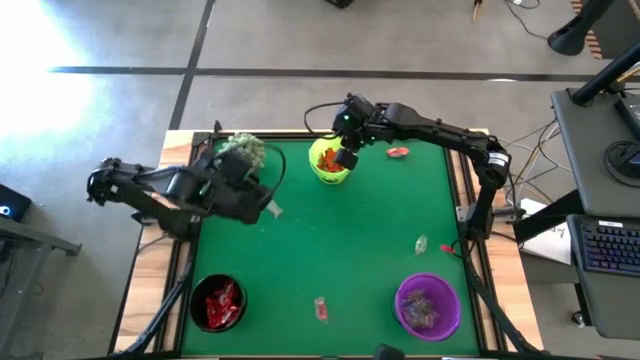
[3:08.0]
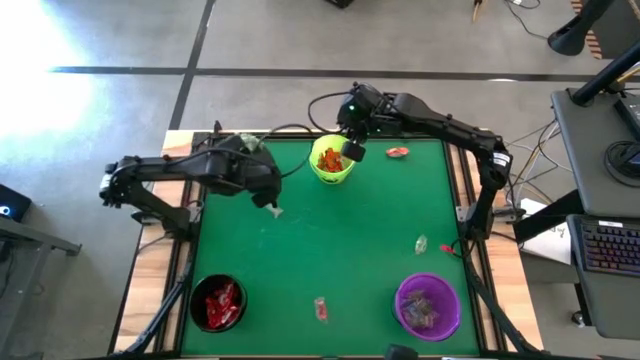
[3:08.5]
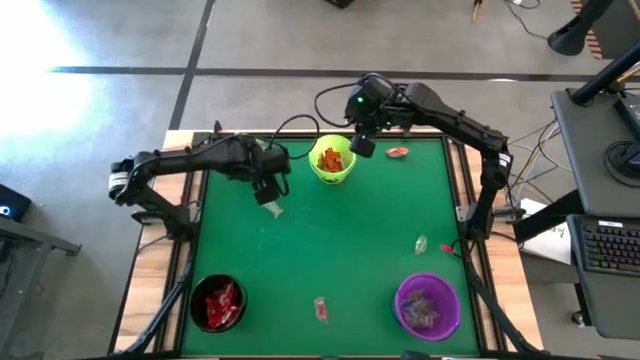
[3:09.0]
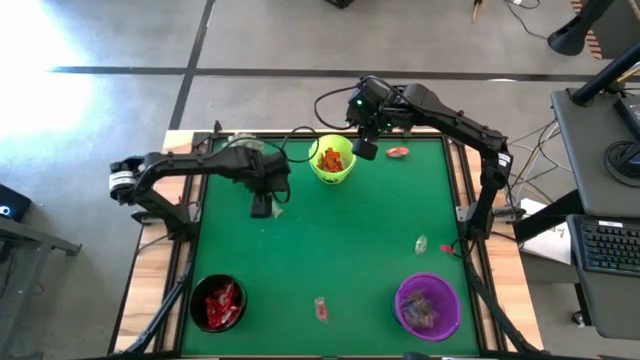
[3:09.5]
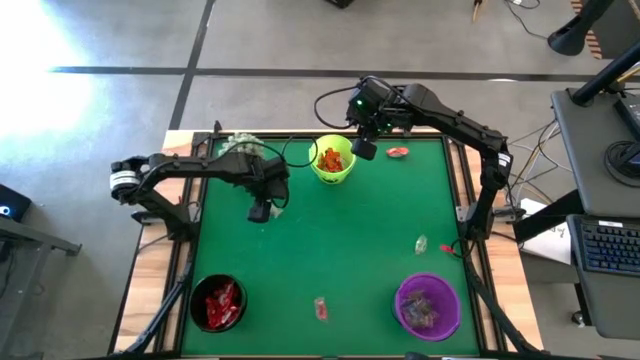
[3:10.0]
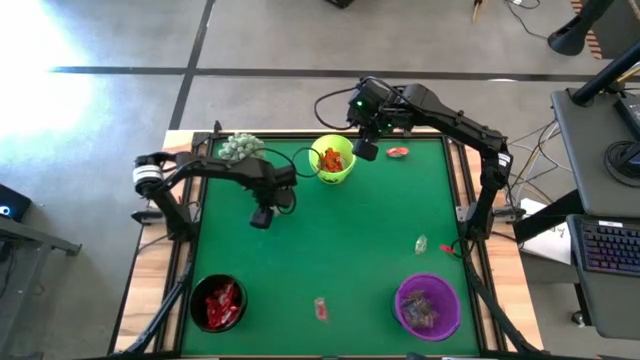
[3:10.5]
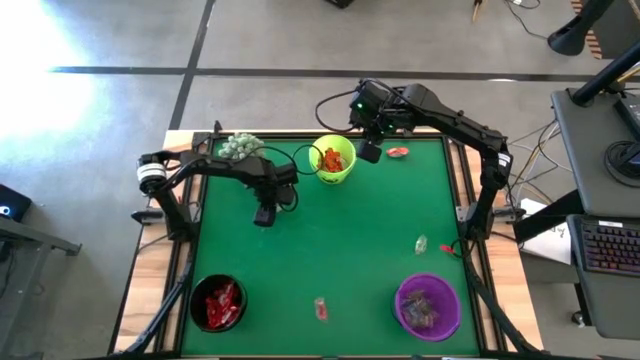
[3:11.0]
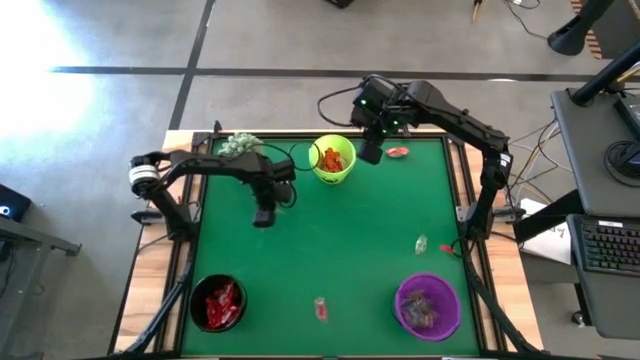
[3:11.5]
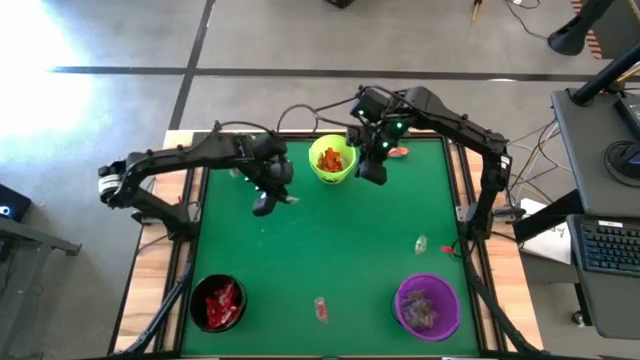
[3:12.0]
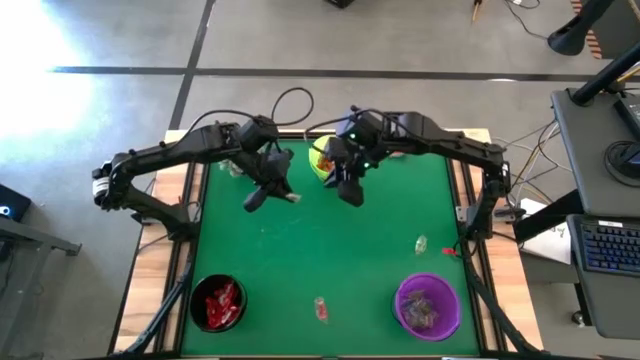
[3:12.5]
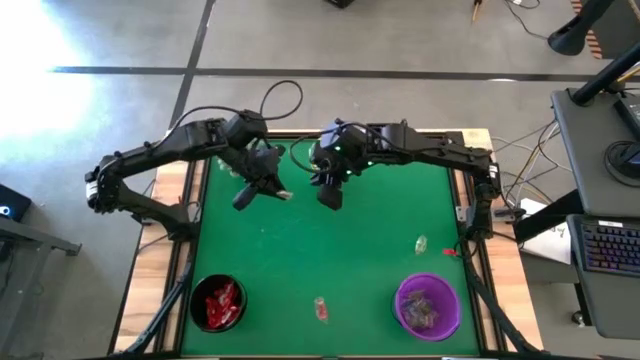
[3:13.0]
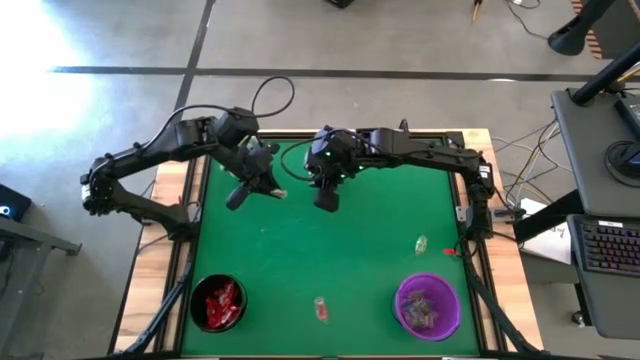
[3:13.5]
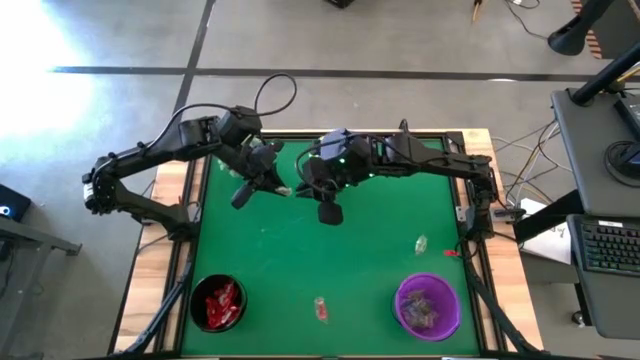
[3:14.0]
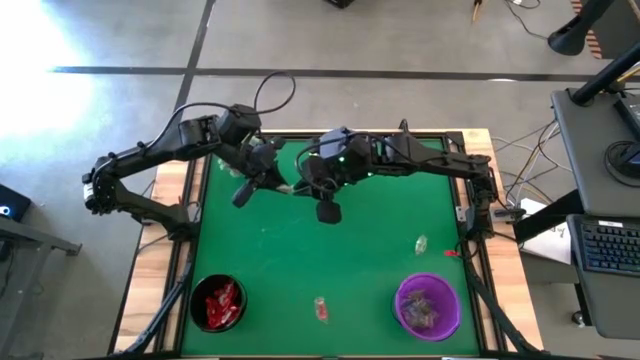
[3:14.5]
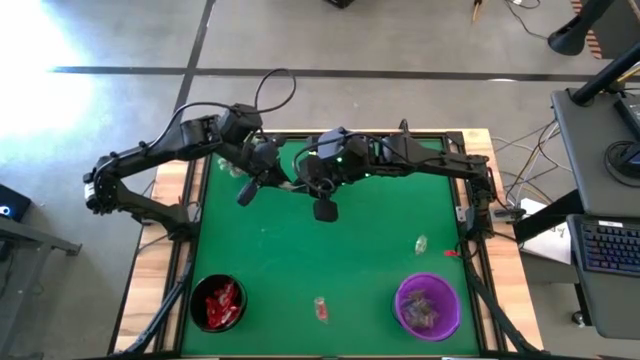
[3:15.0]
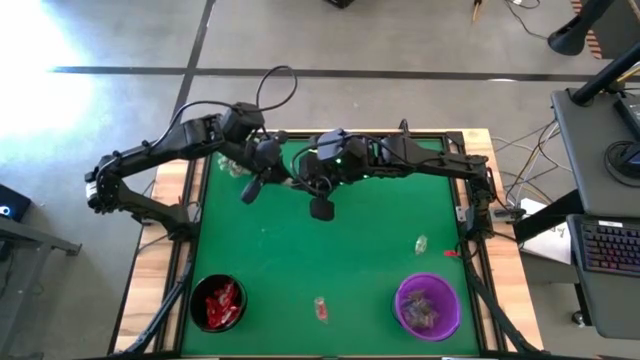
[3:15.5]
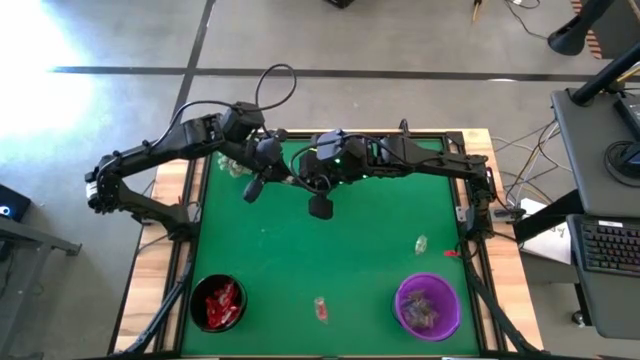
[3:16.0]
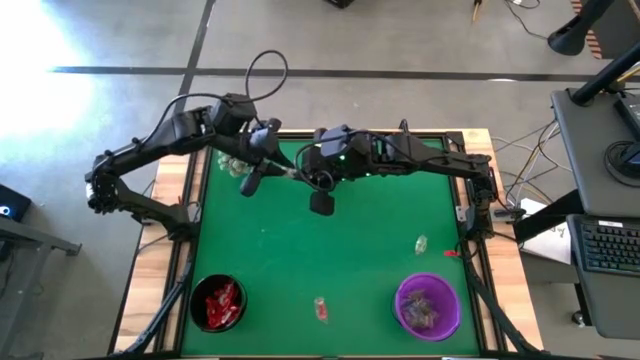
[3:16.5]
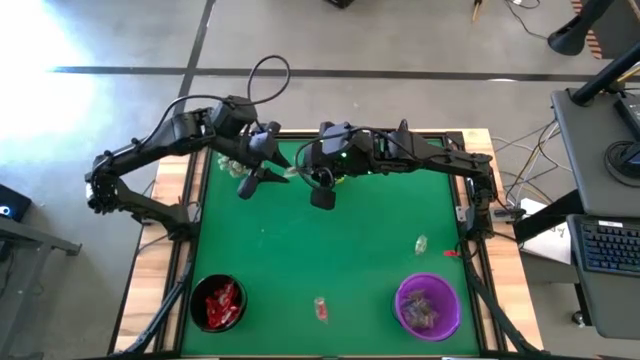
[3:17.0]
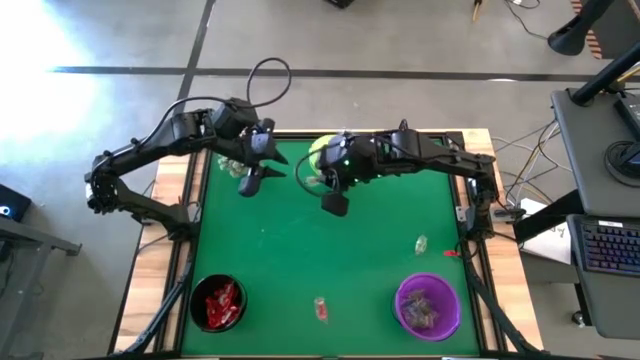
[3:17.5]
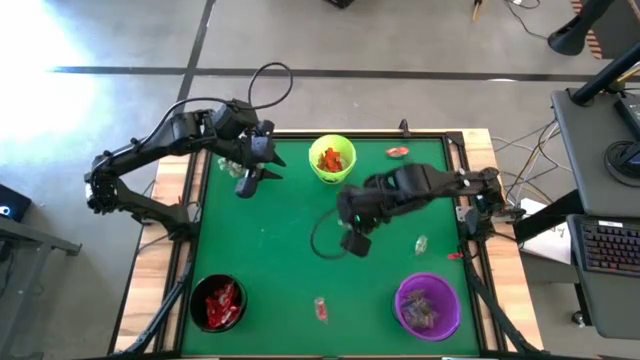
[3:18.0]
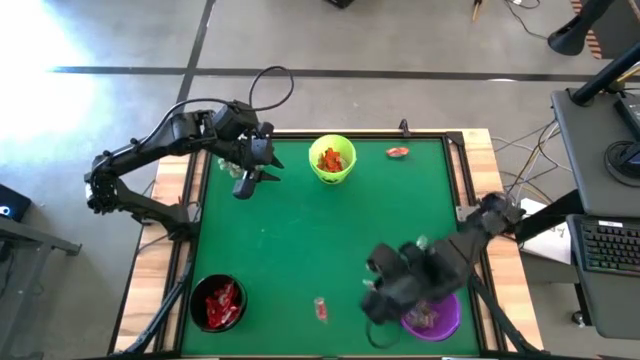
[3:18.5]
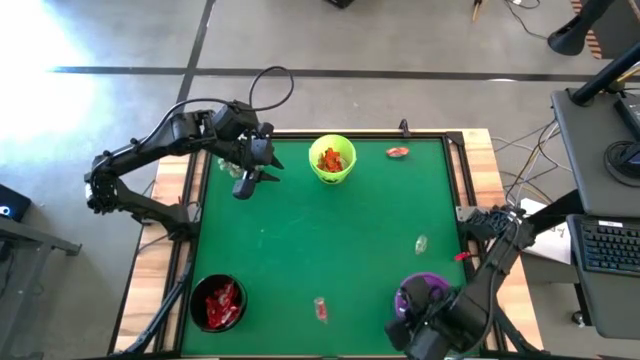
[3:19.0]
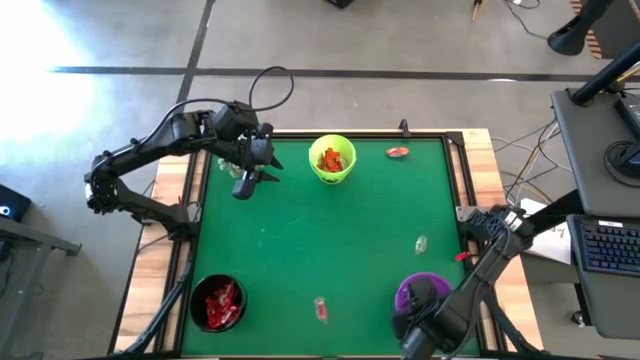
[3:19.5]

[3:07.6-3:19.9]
Task: Organize candy in baskets
Put the green candy into the violet bucket

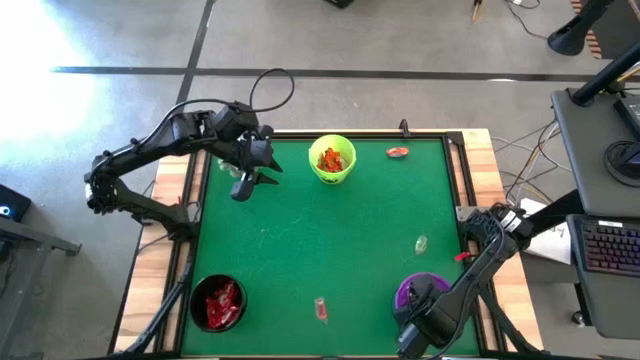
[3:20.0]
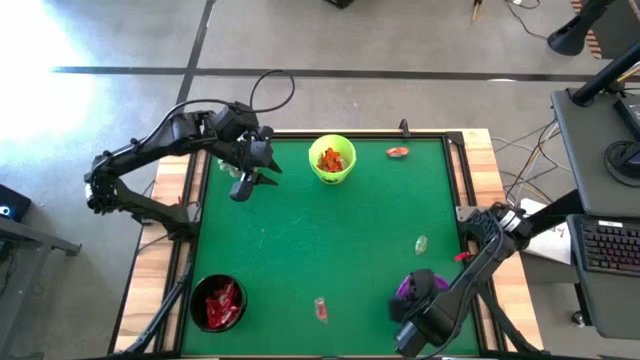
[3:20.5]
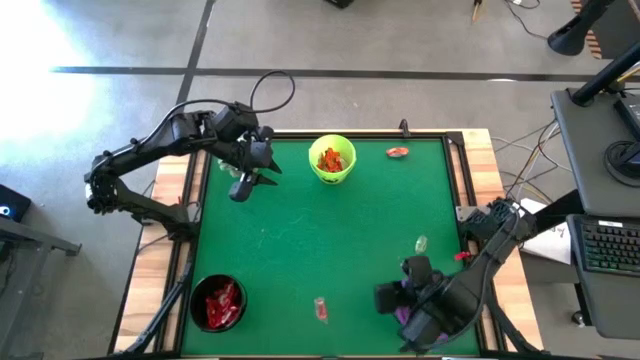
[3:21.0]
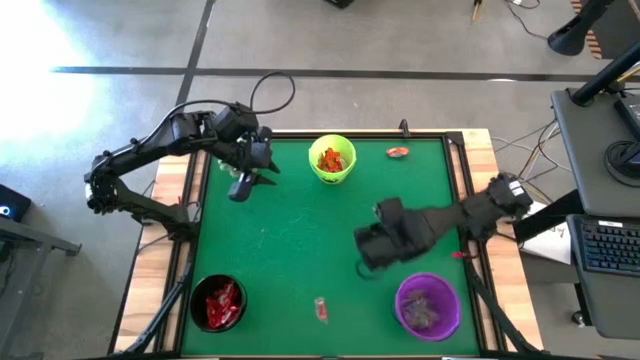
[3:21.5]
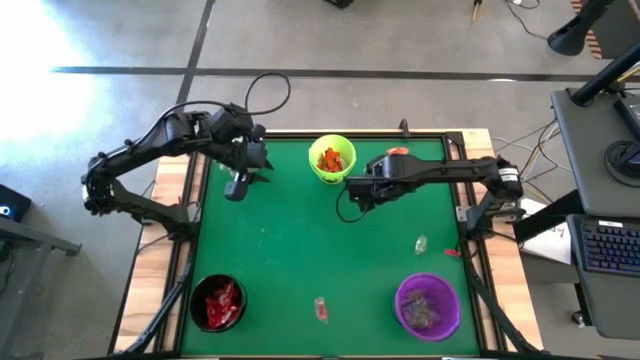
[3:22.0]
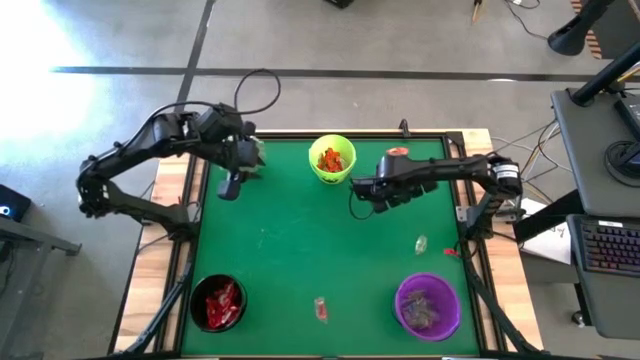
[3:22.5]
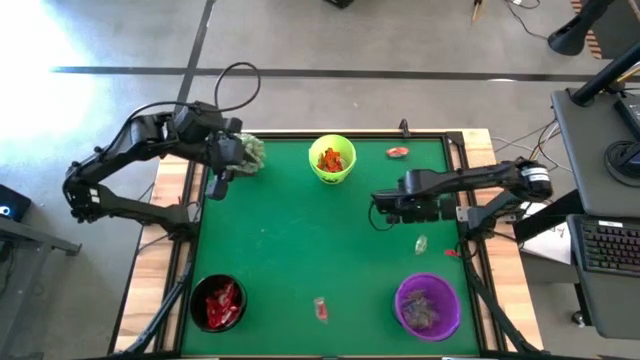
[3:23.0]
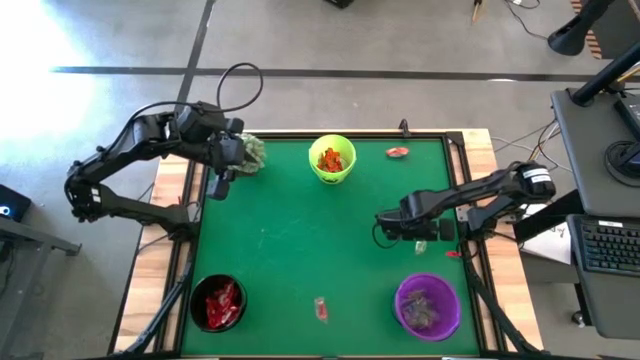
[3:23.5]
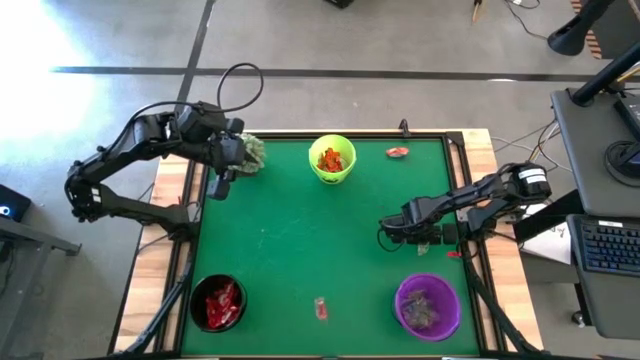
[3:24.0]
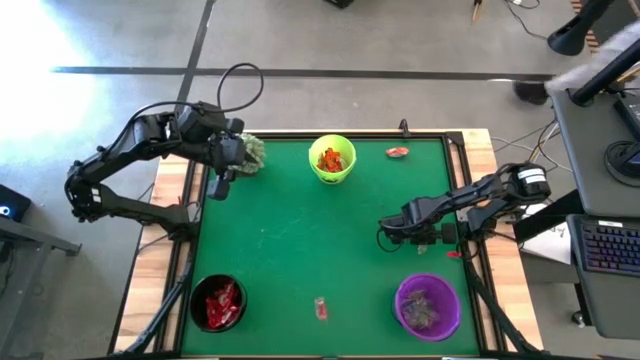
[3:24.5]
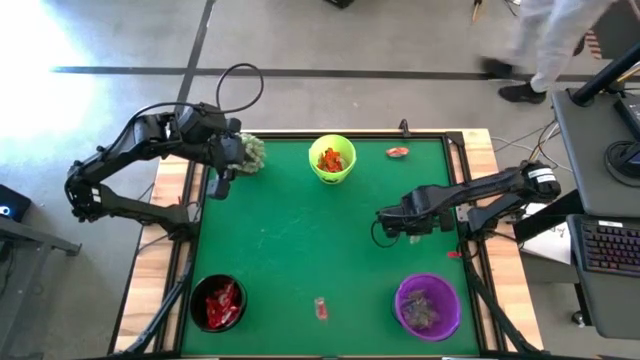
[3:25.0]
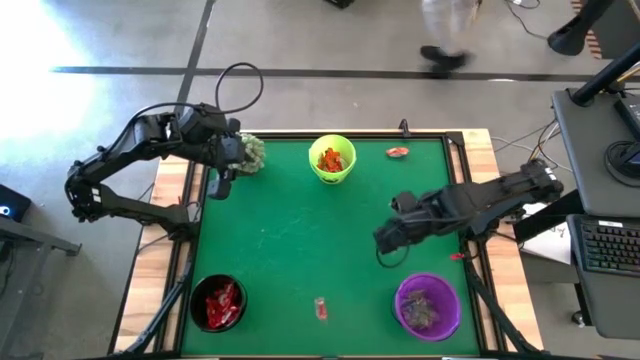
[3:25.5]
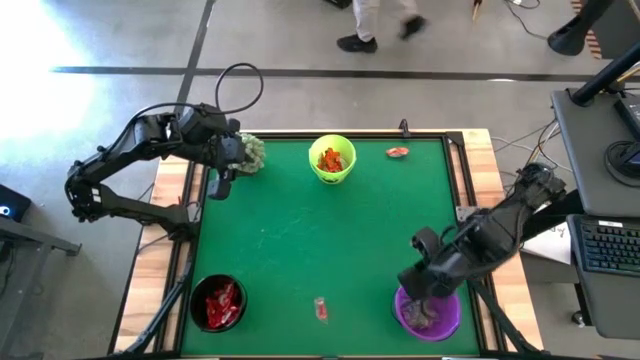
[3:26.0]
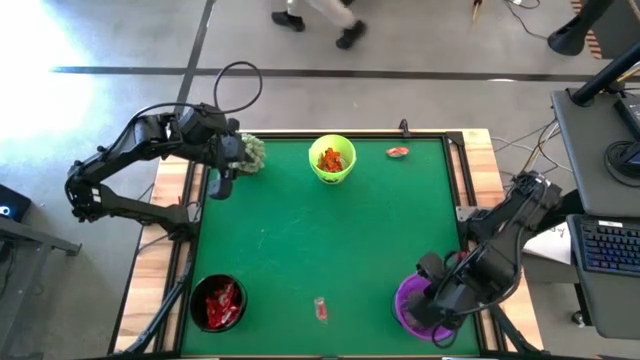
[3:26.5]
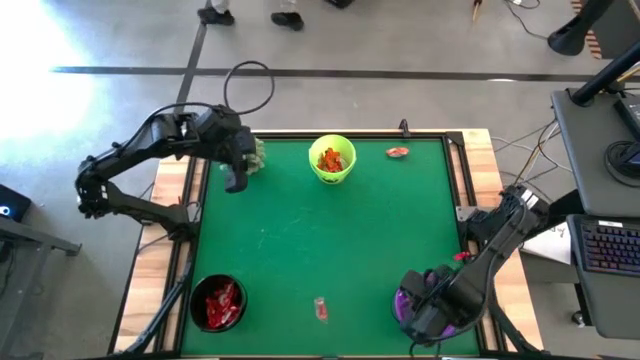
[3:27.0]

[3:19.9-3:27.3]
Put the green candy into the violet bucket

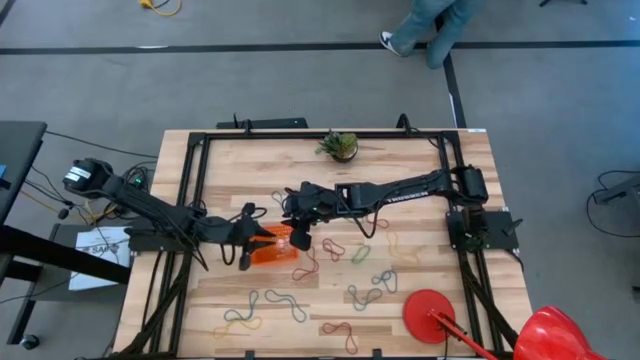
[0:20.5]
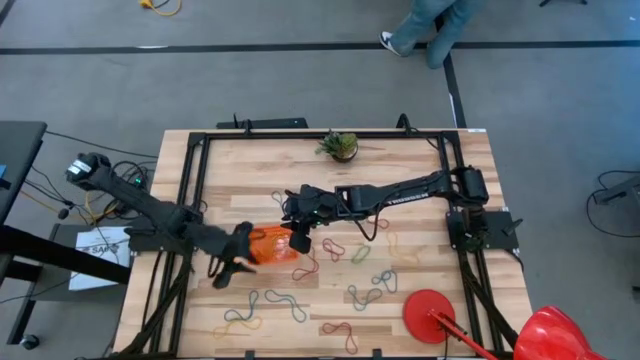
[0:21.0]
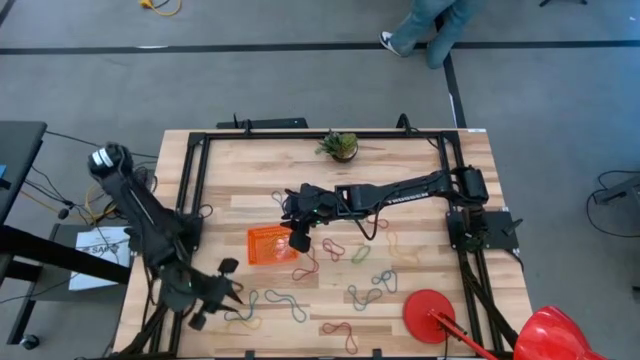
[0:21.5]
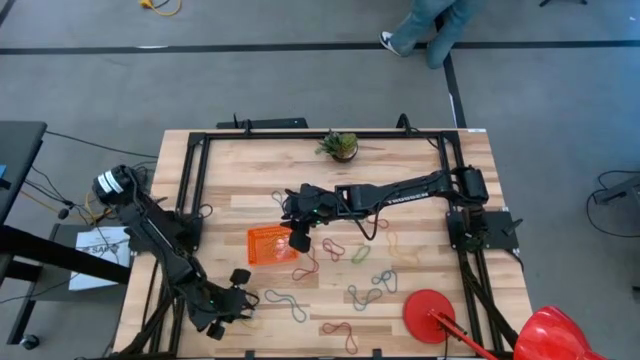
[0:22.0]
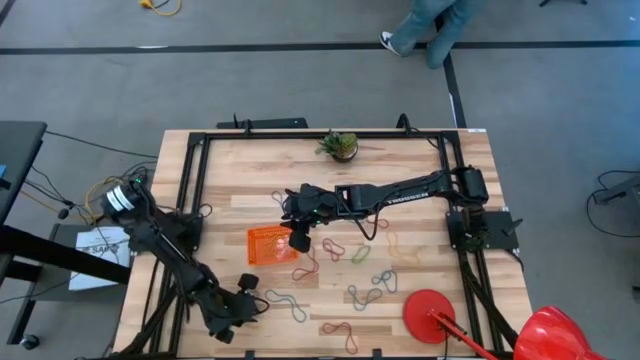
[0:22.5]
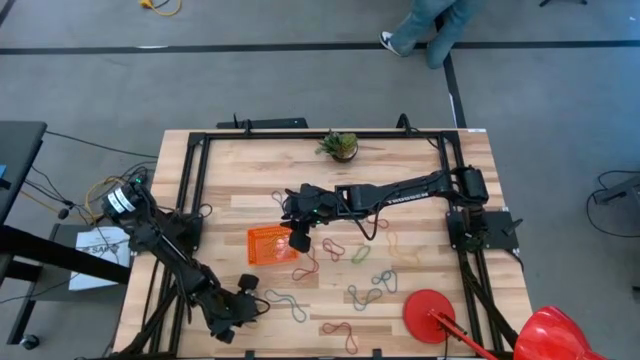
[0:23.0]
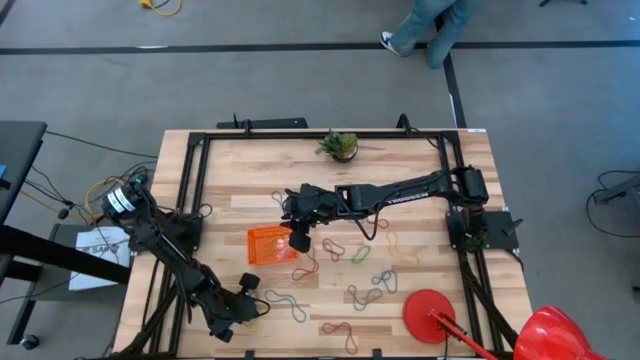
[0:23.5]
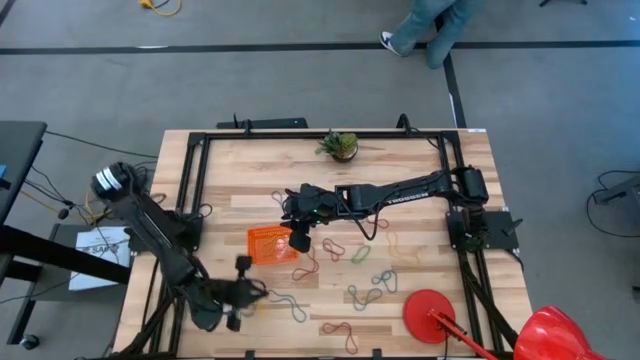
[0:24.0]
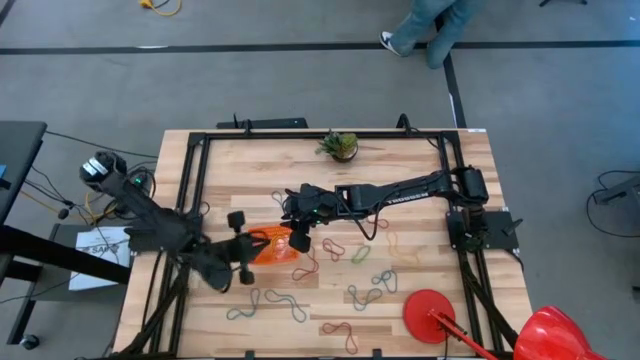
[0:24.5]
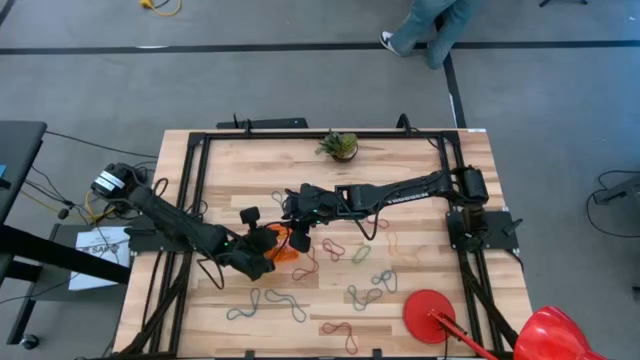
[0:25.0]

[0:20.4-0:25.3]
Task: Pick and place rubber bands into bin
Put the bottom yellow rubber band into the orange container
